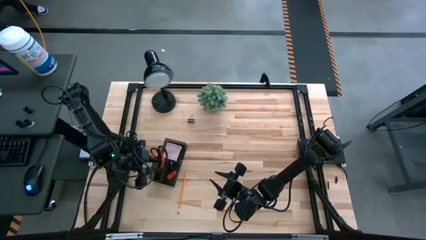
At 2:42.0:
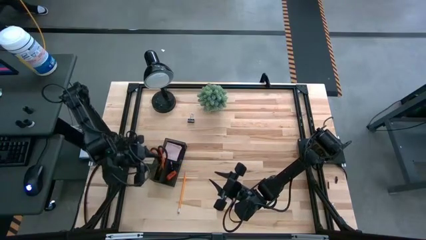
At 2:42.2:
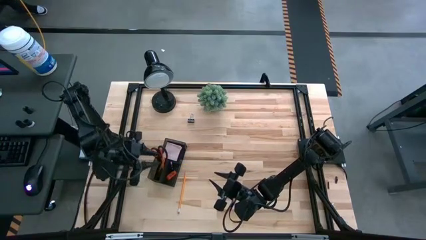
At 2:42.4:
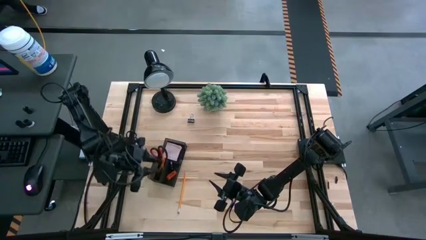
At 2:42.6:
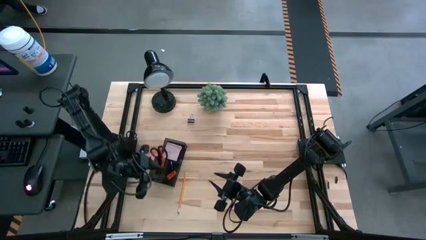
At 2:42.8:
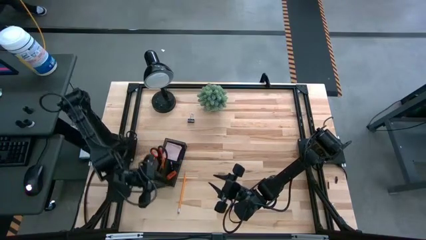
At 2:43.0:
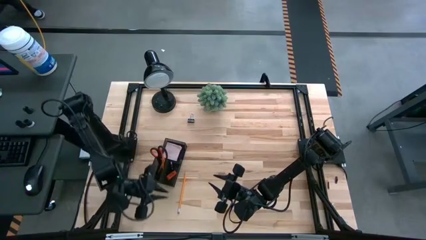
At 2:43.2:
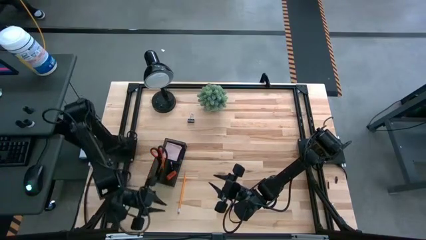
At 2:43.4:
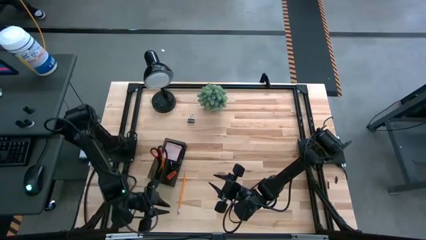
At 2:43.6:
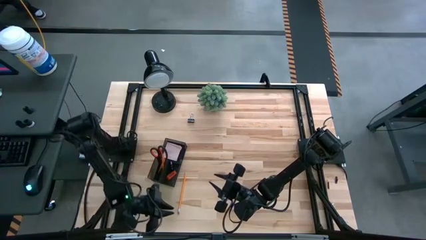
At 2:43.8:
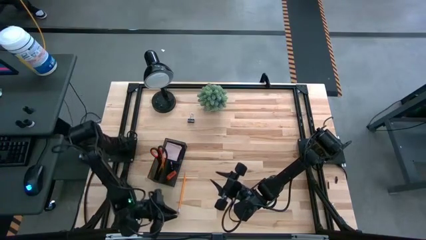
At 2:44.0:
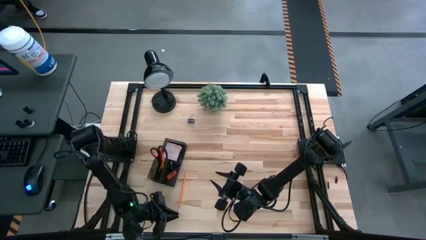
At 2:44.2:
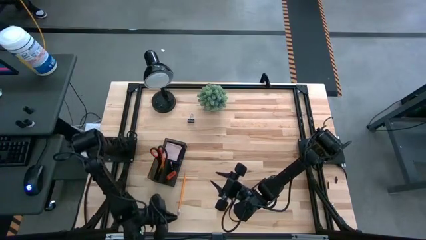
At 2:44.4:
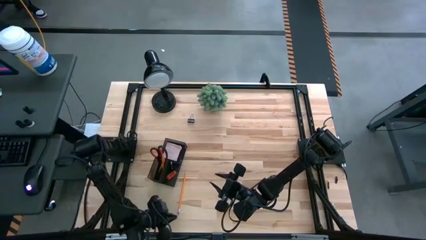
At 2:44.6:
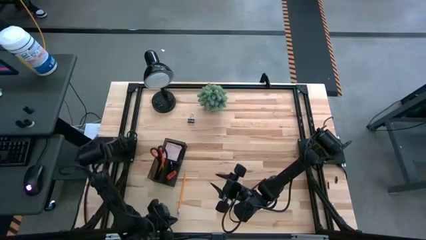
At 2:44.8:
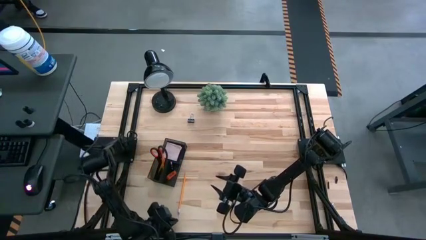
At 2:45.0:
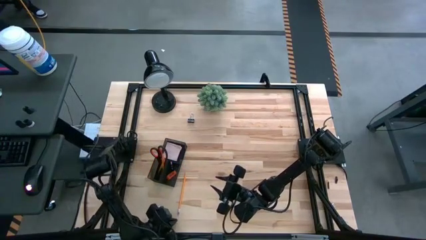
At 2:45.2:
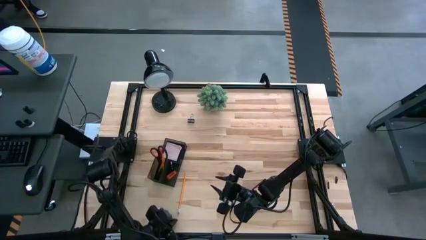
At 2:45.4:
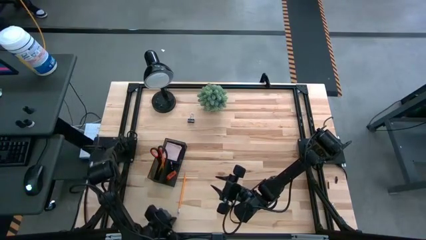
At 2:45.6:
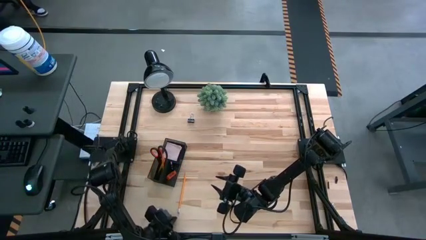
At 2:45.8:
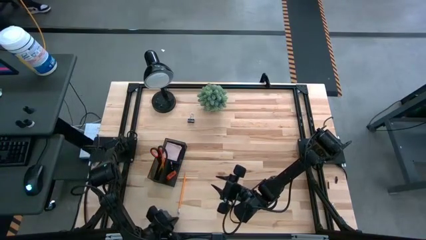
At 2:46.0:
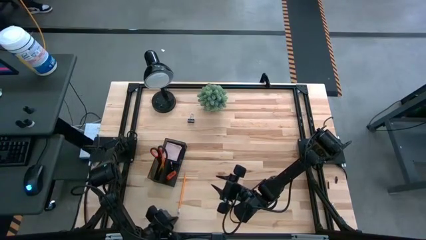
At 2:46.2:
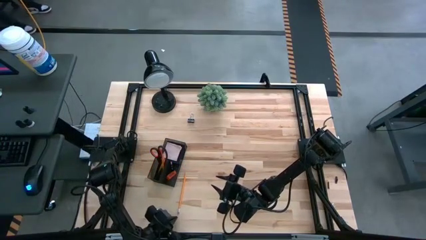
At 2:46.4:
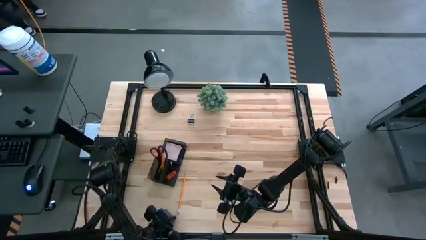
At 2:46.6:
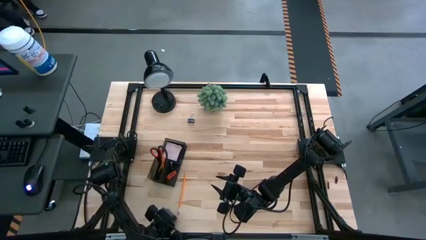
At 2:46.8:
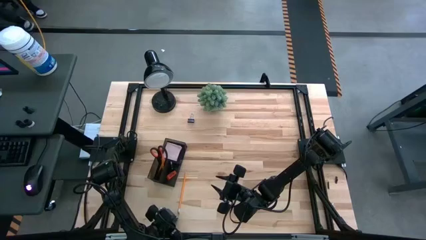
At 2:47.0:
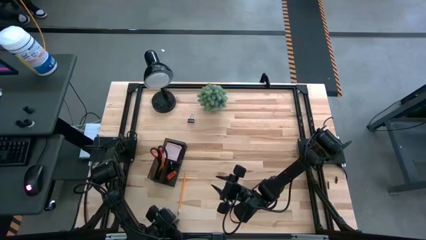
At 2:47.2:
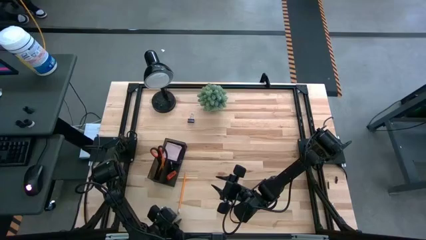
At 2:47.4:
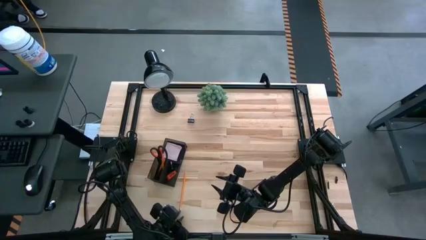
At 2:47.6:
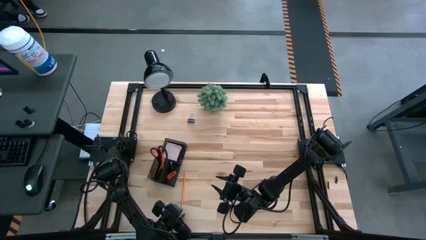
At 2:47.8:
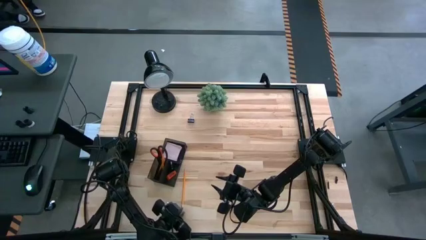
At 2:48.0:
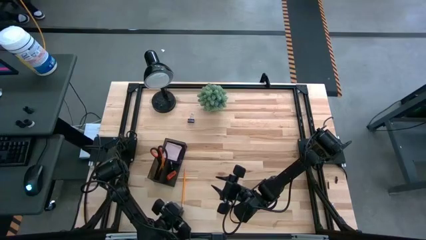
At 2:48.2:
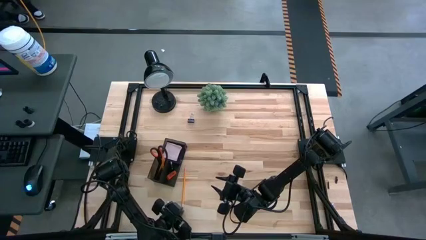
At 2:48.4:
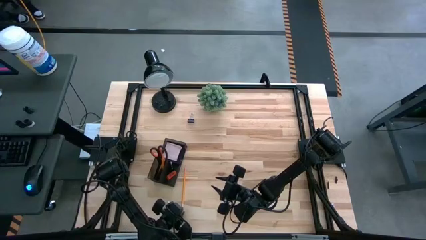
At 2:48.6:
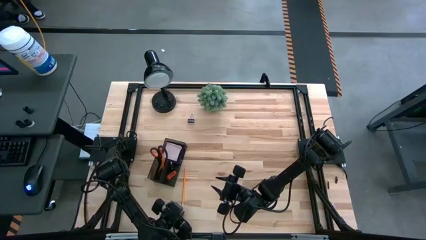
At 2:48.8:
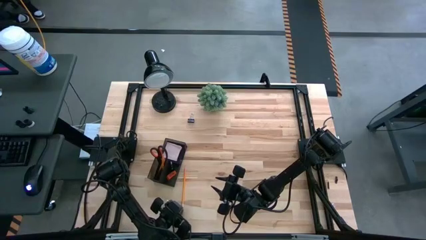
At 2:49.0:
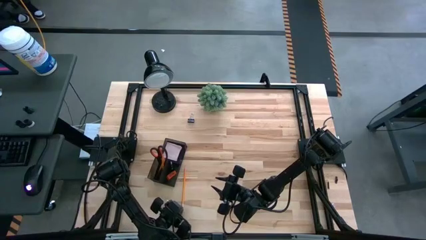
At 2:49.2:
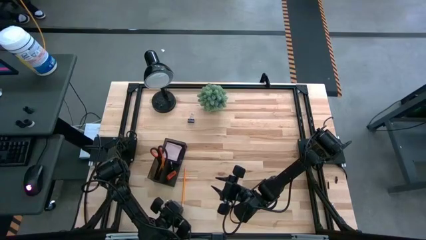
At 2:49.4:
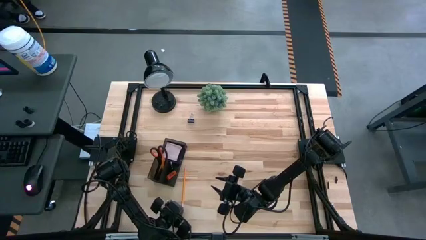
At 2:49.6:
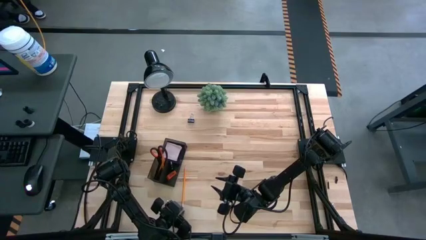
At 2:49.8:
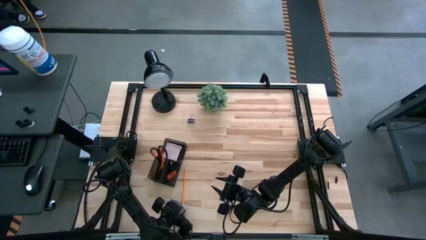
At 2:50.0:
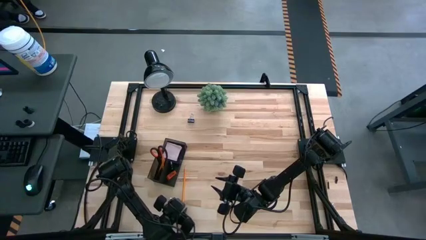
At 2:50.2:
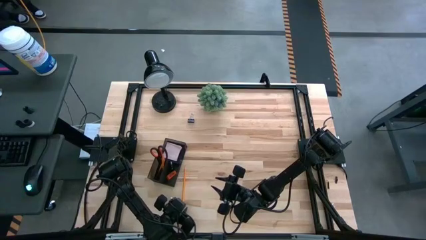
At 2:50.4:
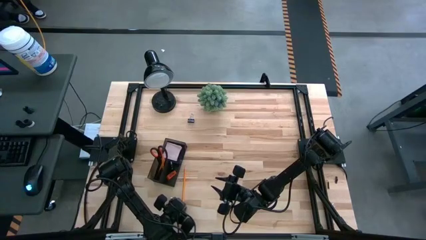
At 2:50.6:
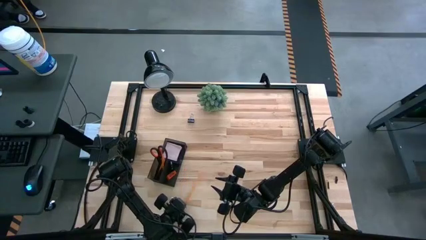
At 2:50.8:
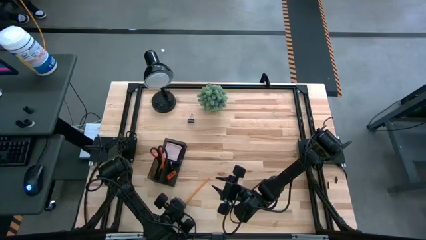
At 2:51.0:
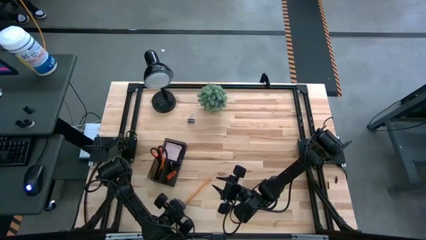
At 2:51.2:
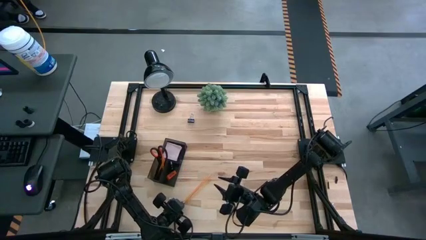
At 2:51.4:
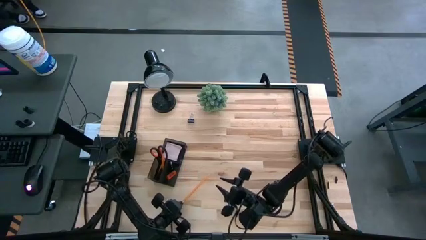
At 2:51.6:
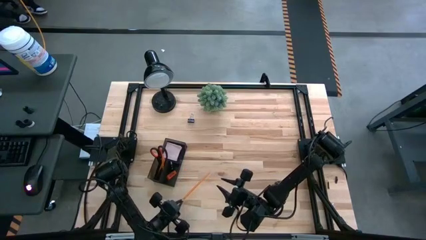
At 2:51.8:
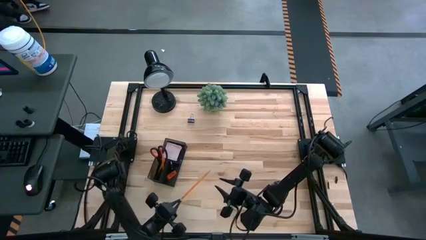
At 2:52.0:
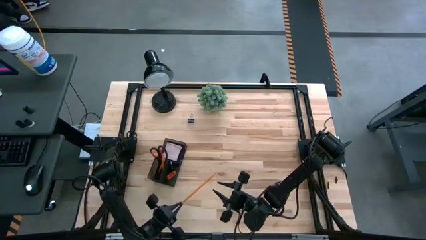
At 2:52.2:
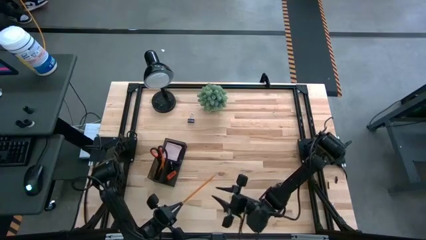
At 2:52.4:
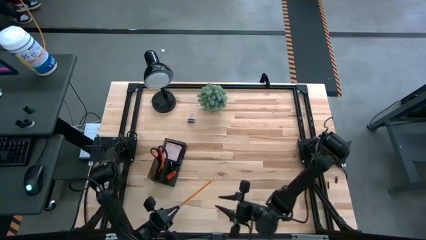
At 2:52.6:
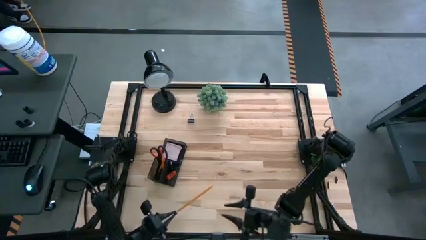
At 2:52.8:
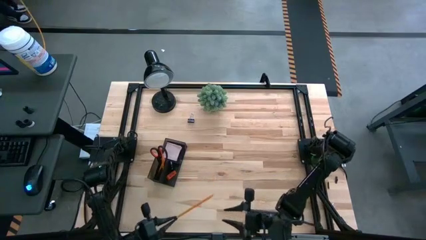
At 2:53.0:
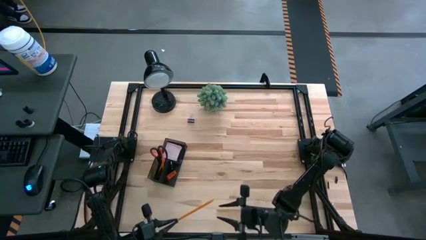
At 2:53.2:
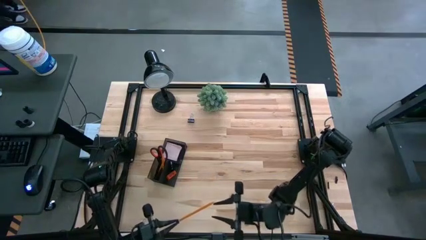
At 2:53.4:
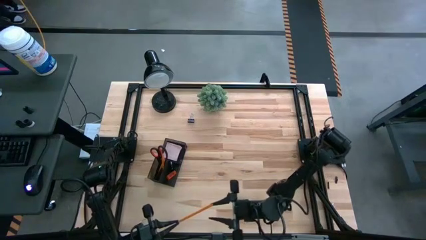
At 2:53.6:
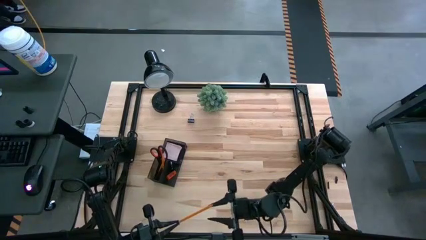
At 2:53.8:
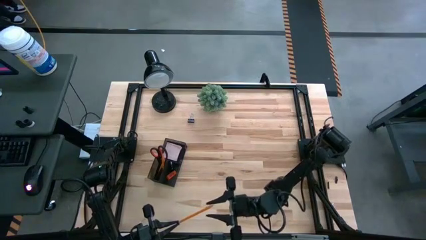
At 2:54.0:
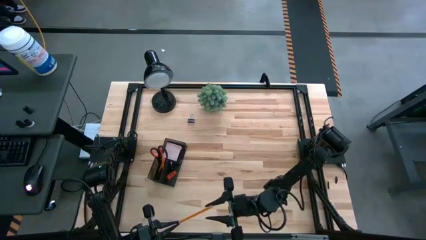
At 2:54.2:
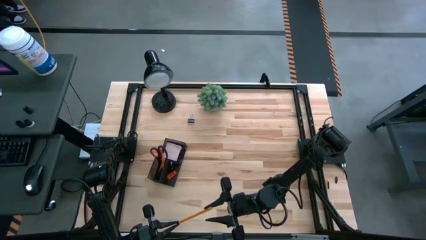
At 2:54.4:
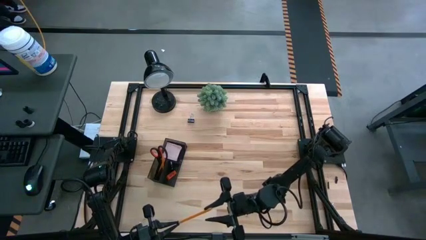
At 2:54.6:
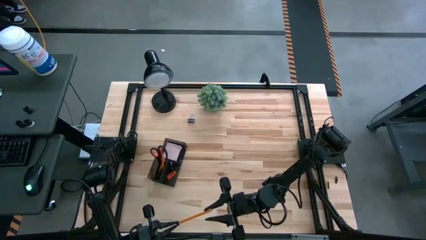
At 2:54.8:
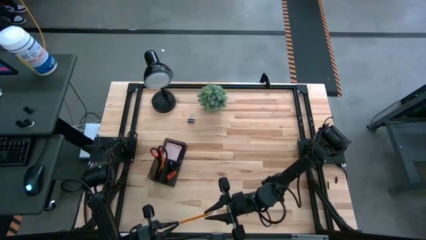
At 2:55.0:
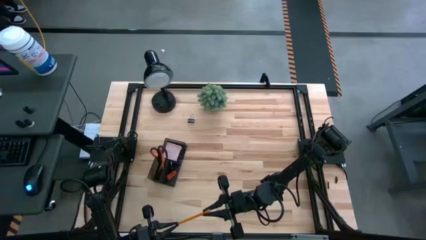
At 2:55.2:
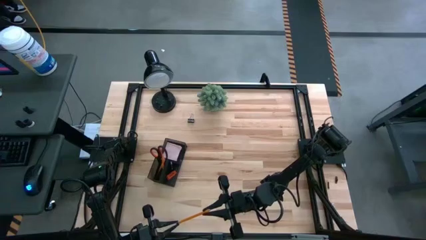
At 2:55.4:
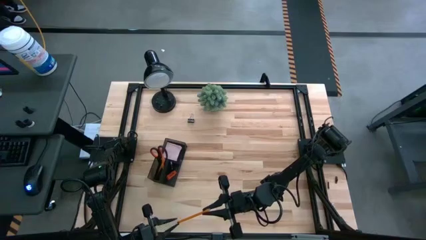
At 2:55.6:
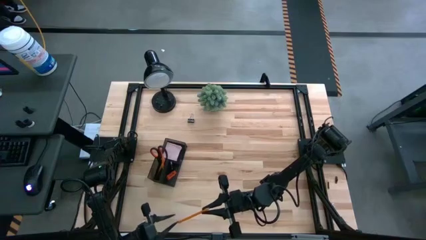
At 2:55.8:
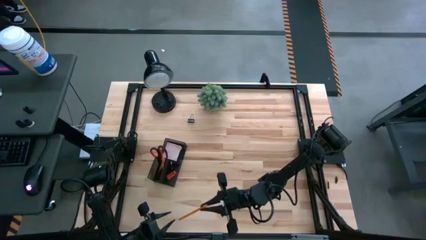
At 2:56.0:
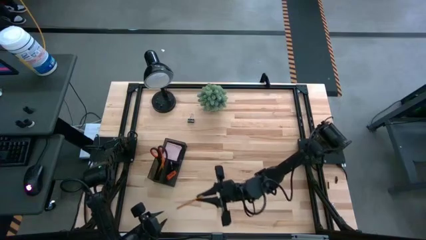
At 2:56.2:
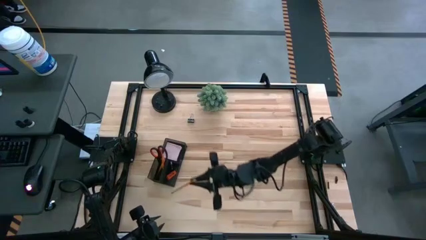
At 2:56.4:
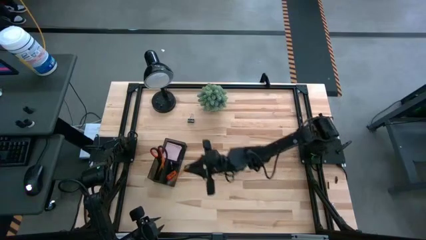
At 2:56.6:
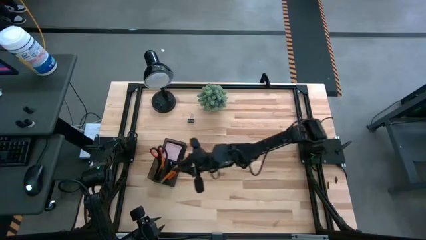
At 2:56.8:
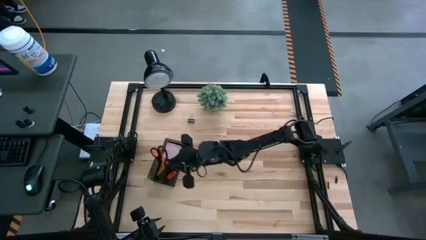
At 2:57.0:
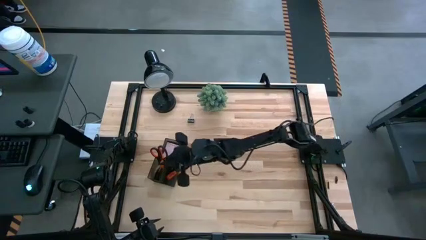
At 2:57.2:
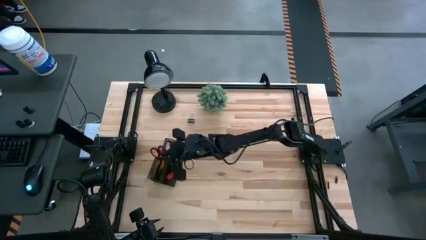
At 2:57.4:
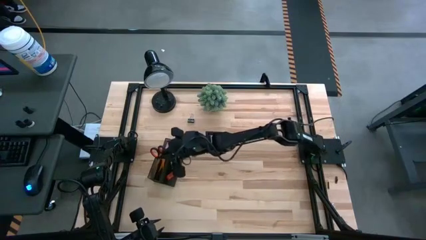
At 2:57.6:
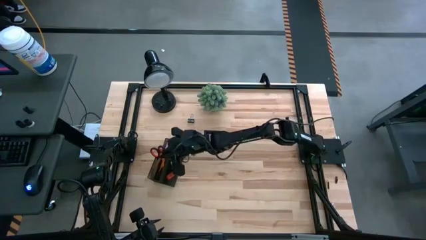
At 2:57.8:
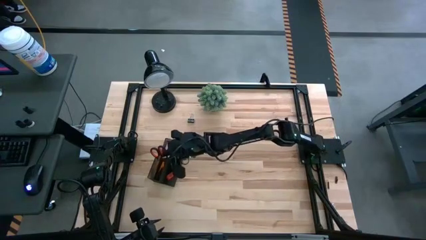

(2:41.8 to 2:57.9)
Task: Pick and place office supplies into organizer
Put the orange pencil into the desk organizer
